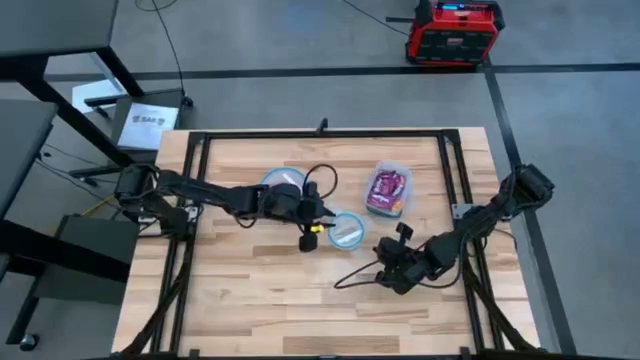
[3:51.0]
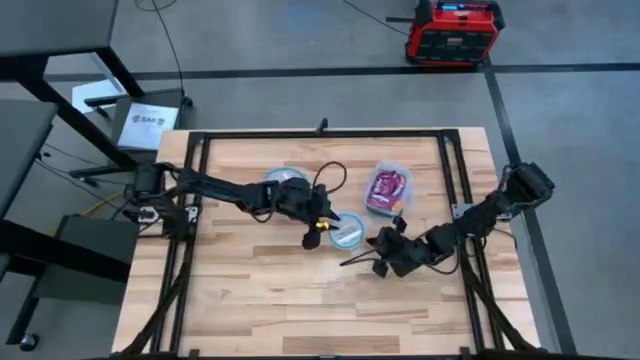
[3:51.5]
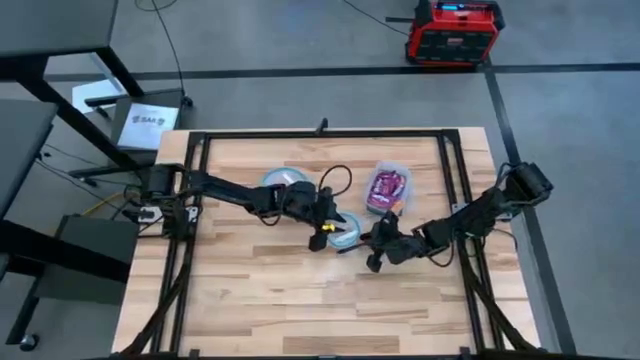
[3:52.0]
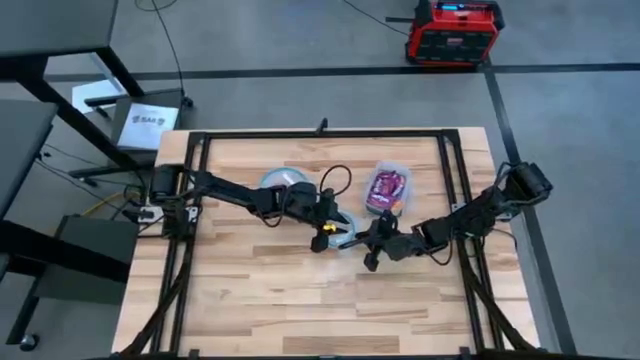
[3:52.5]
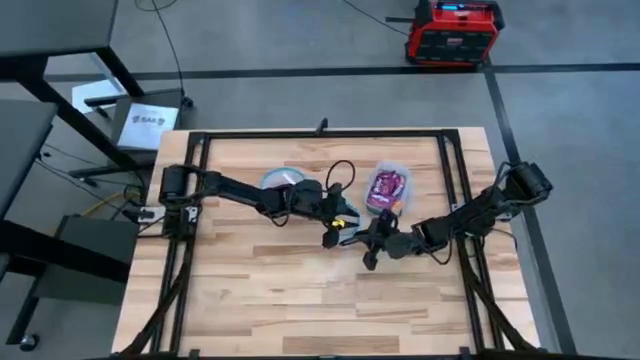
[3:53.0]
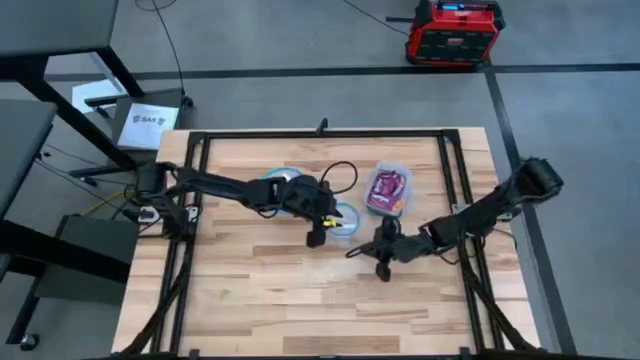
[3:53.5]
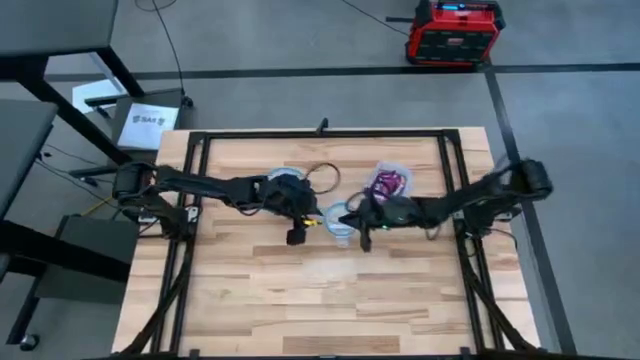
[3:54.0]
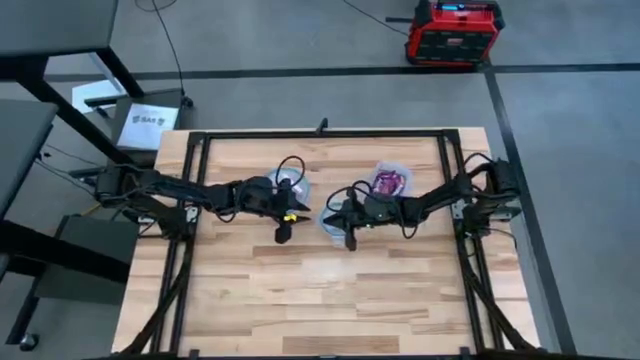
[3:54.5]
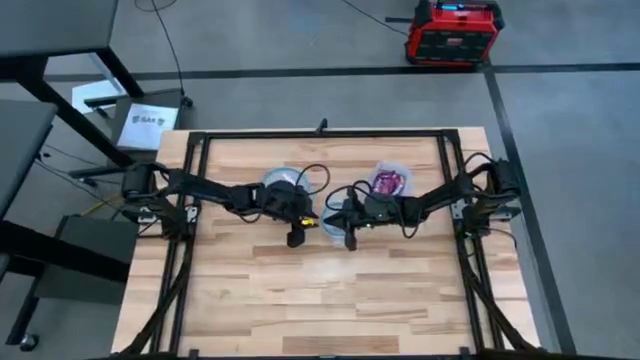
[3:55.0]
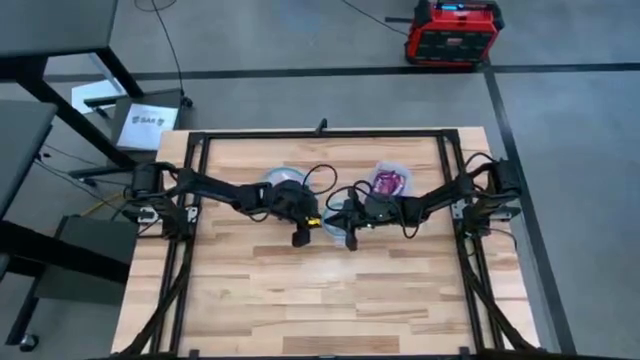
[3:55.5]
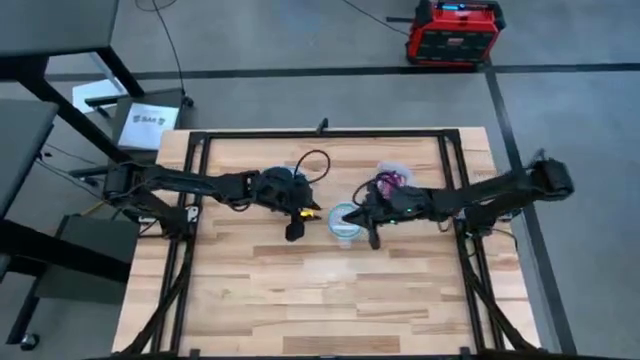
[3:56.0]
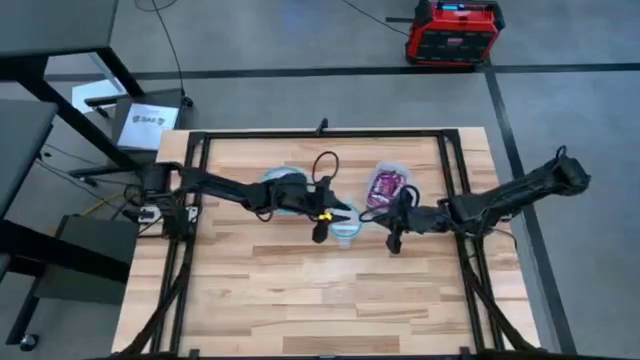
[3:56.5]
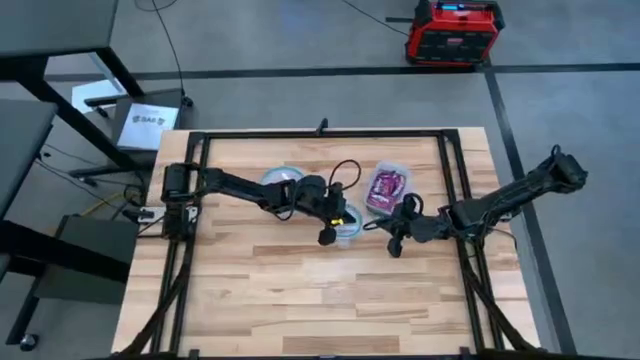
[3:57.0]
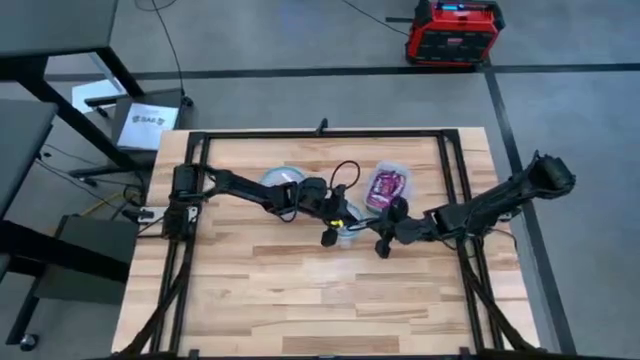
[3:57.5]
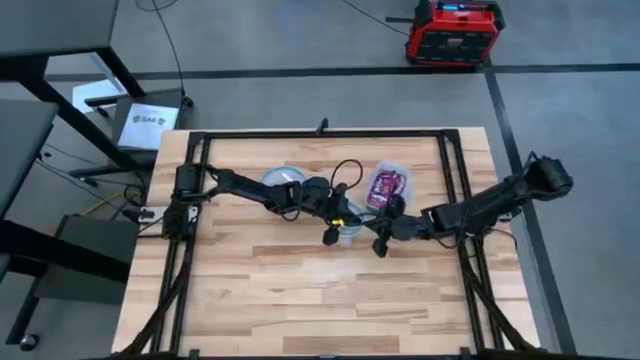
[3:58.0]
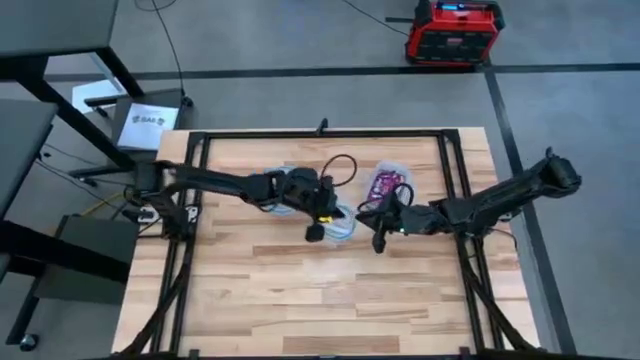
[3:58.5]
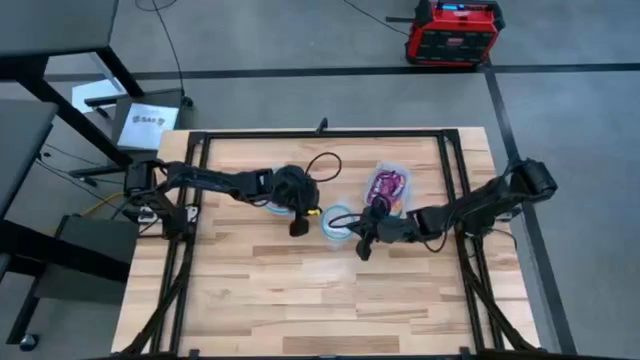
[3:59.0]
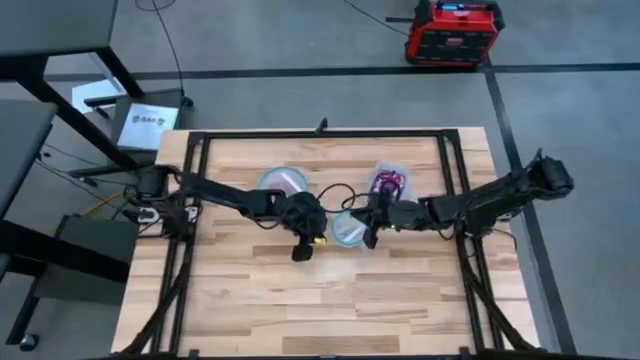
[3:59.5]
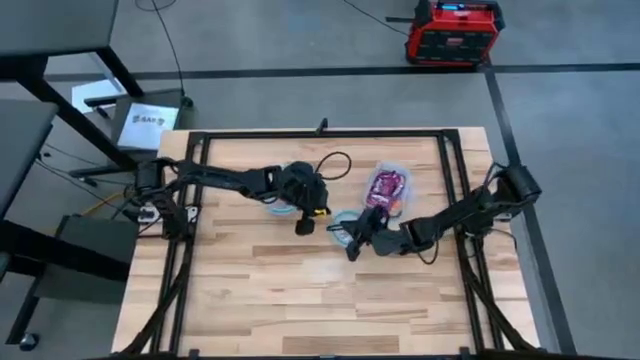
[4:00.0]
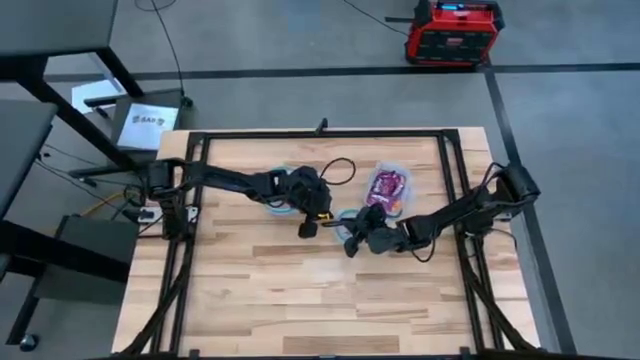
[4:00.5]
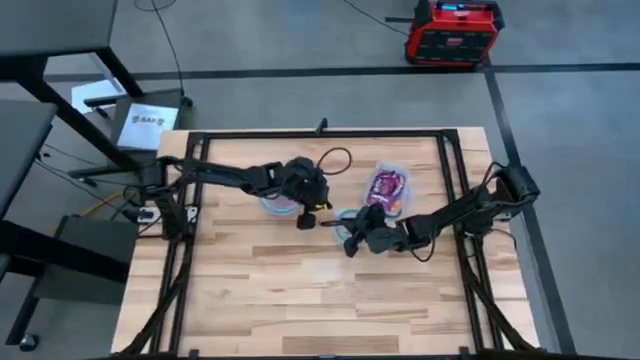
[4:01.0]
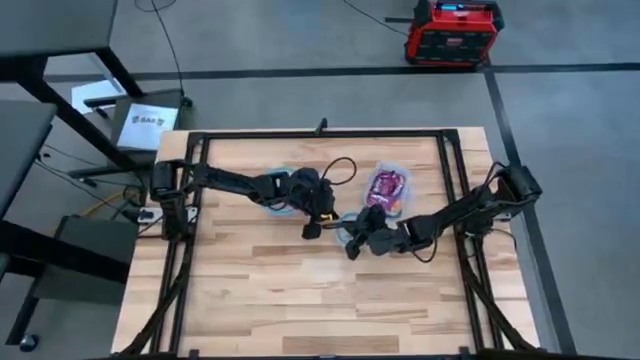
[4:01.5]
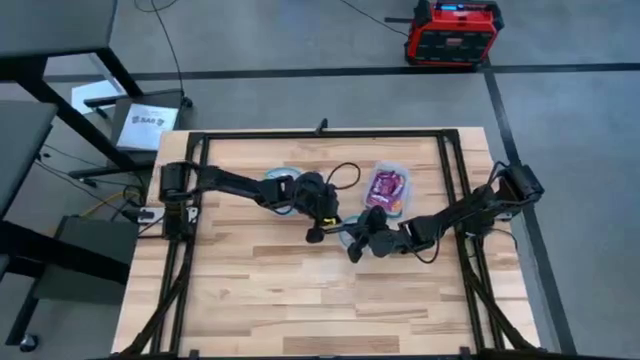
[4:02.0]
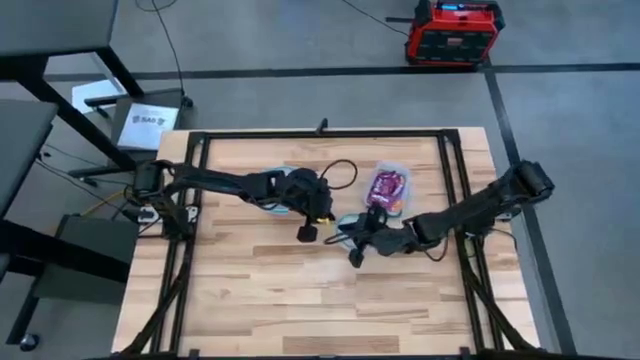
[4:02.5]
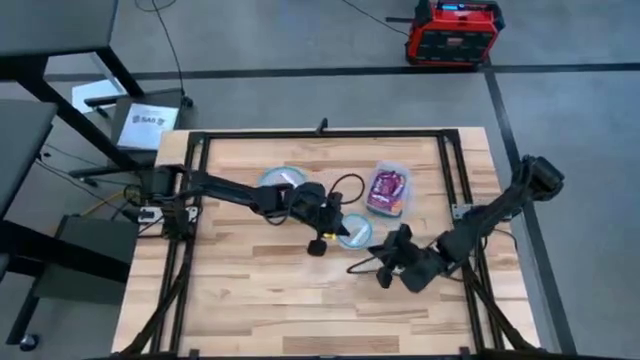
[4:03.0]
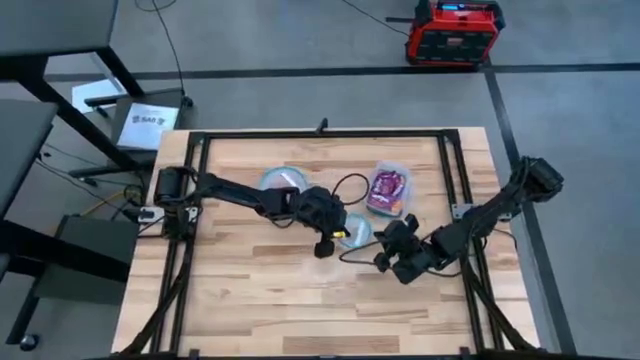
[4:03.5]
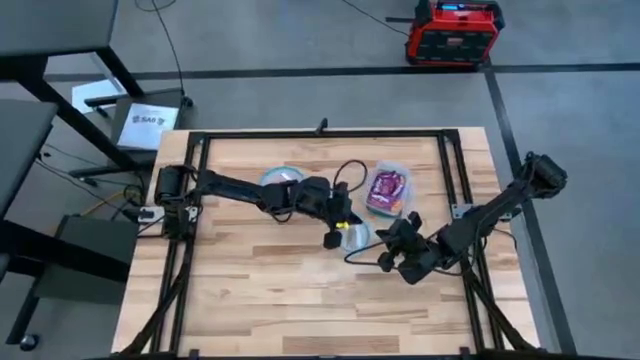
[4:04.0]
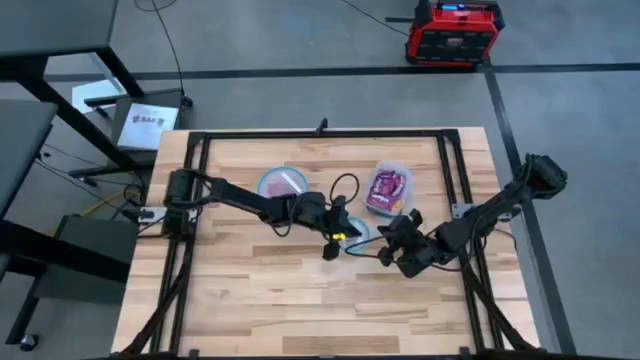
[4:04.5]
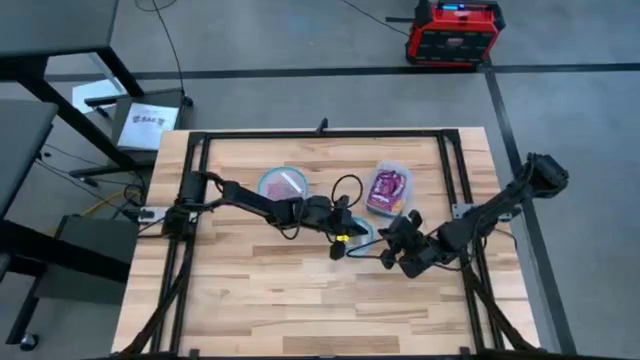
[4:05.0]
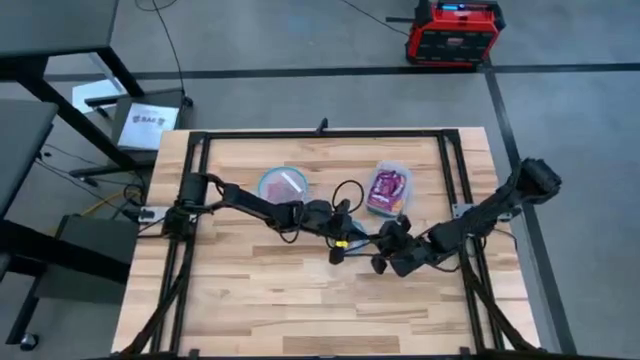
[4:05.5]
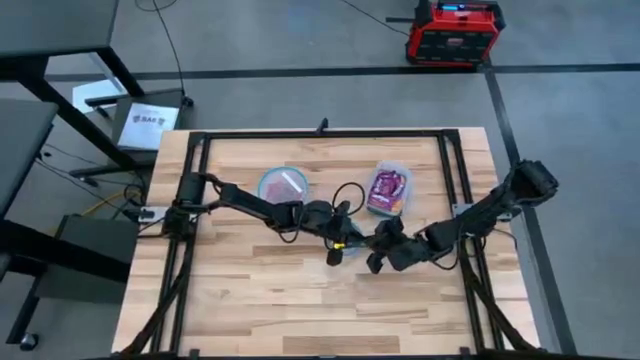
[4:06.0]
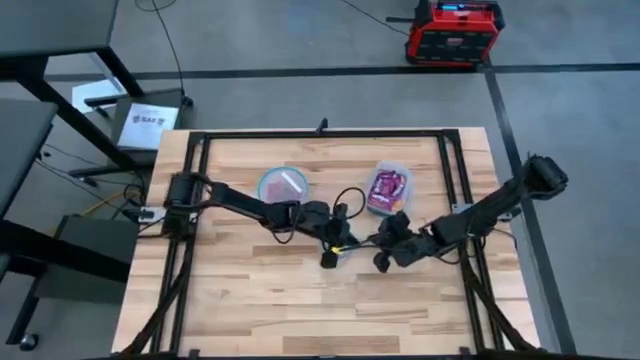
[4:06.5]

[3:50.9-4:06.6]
Task: Sort candy
Close the center transparent bin with the lid

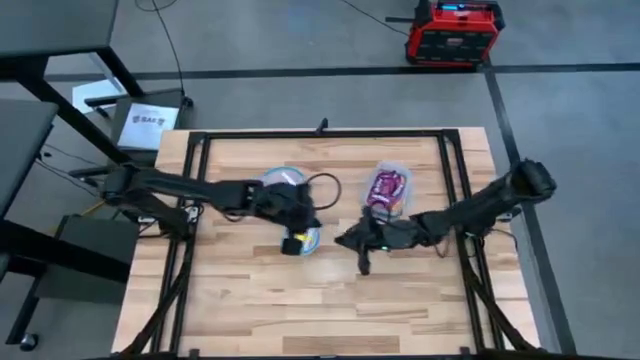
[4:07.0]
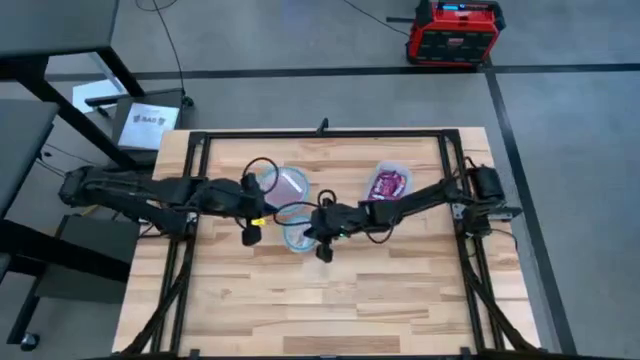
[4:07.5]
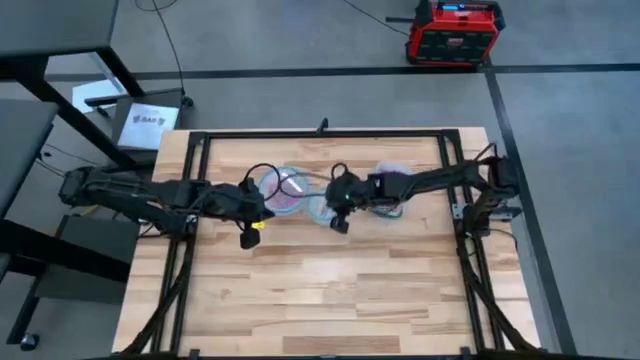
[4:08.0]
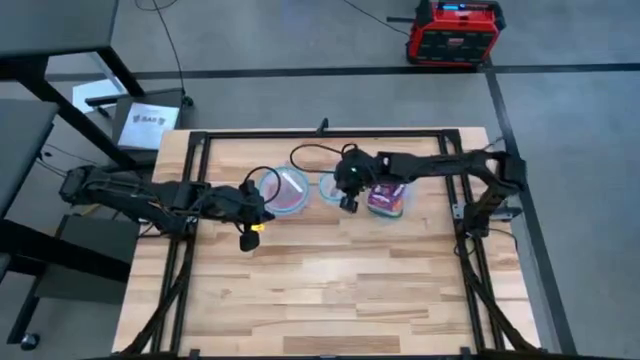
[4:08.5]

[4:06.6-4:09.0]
Move the center transparent bin to the top center

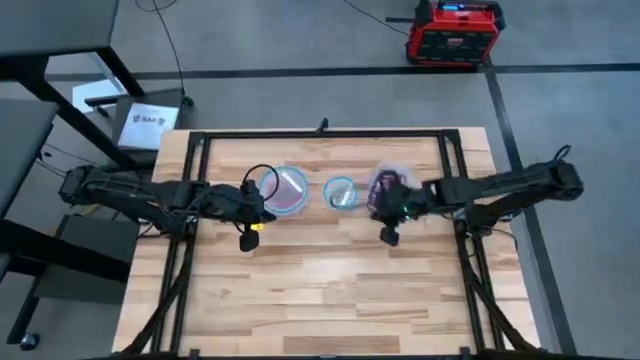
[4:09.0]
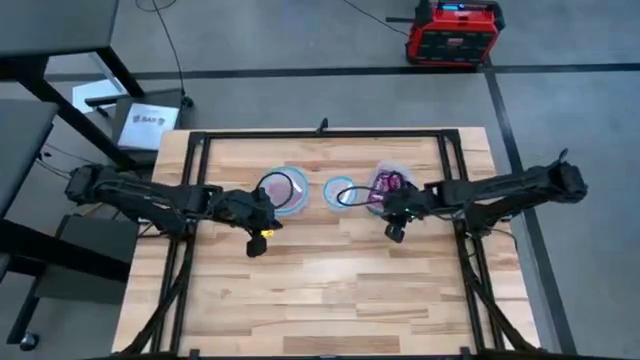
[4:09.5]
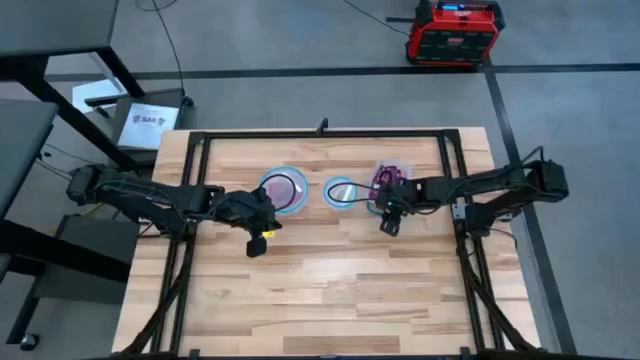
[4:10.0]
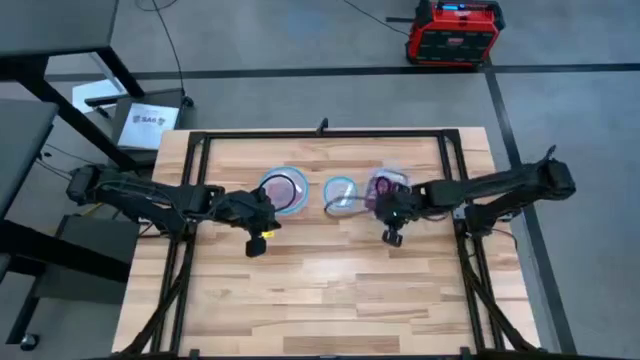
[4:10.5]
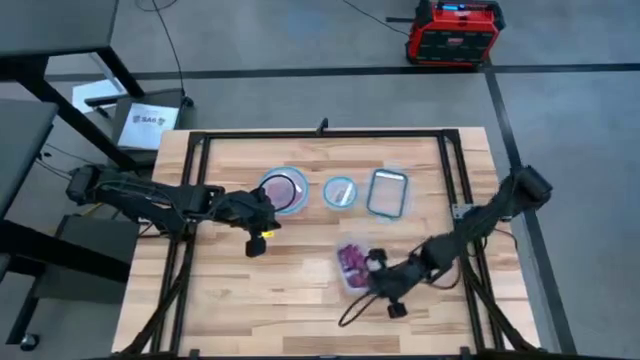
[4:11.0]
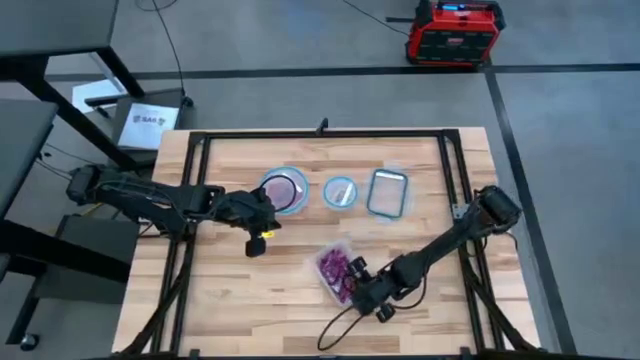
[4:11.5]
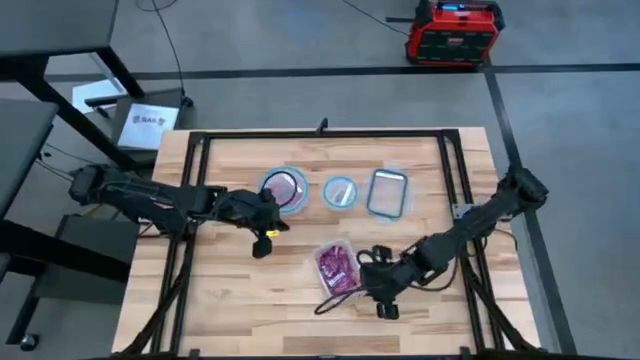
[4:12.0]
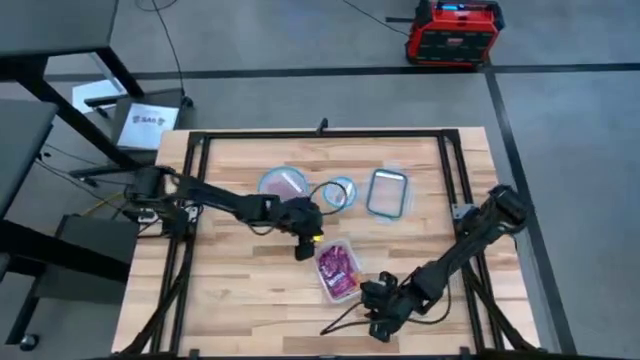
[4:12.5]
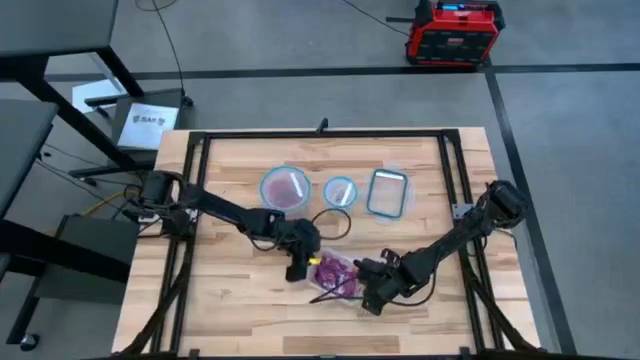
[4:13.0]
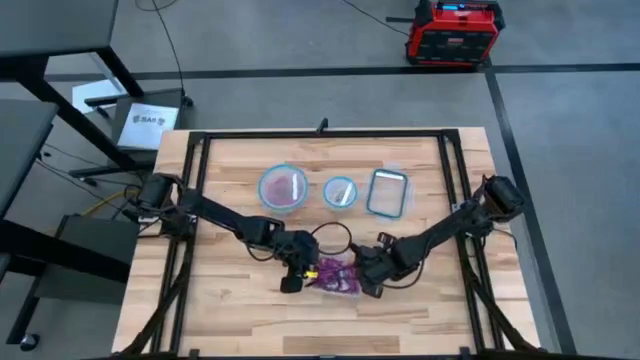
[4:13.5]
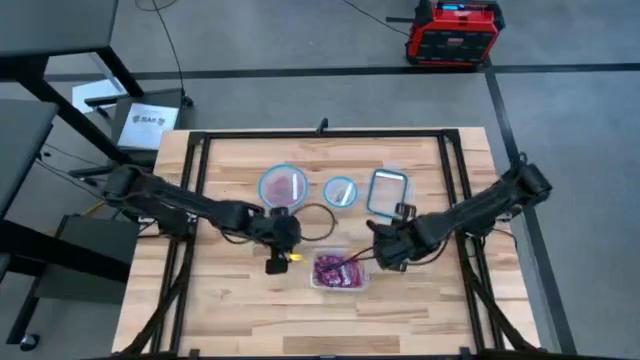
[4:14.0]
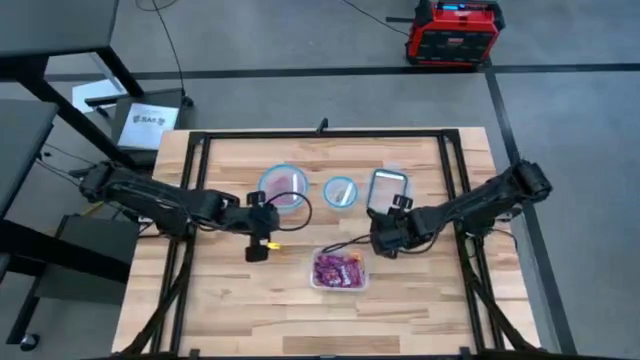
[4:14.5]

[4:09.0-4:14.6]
Move the top right transparent bin to the center
